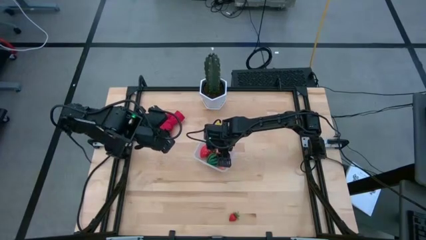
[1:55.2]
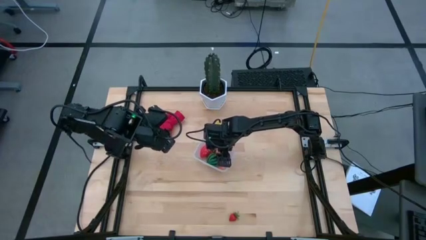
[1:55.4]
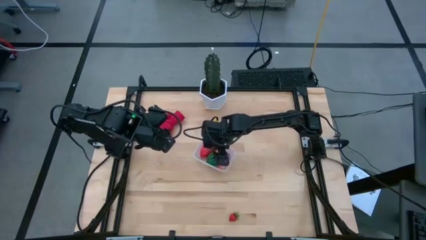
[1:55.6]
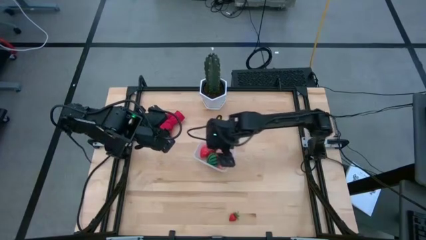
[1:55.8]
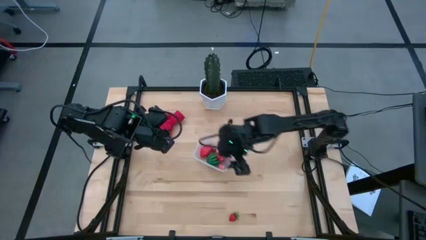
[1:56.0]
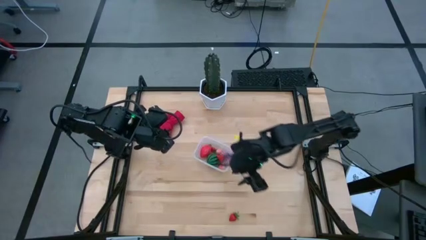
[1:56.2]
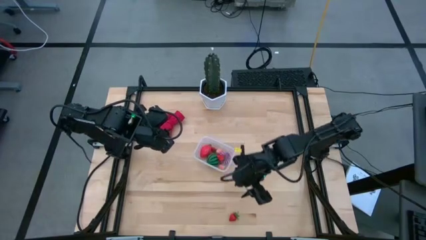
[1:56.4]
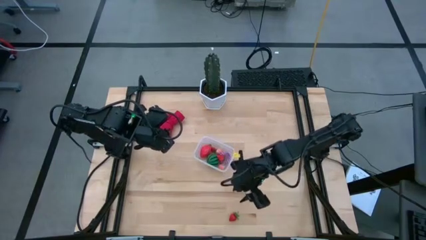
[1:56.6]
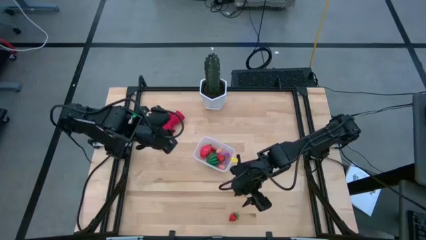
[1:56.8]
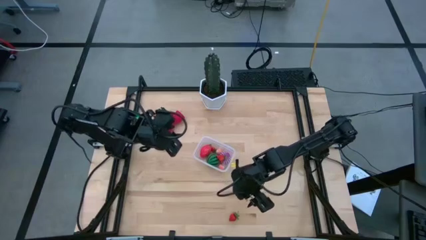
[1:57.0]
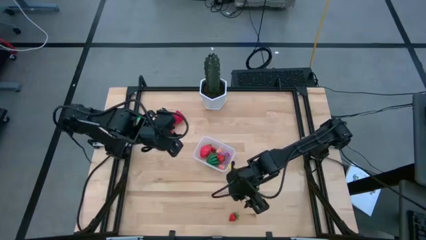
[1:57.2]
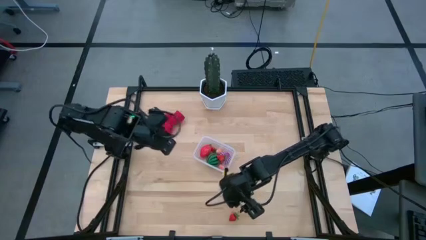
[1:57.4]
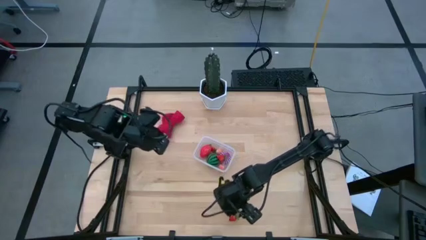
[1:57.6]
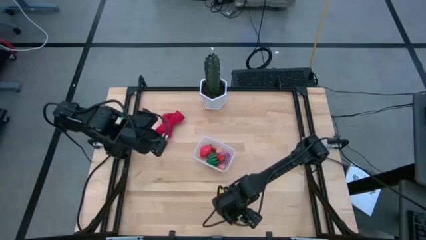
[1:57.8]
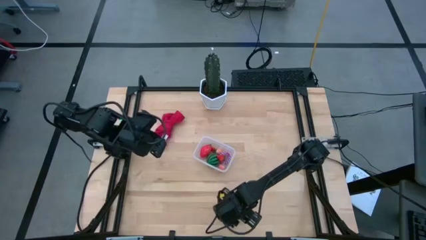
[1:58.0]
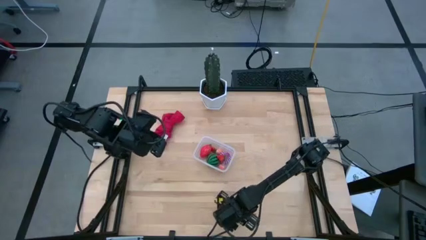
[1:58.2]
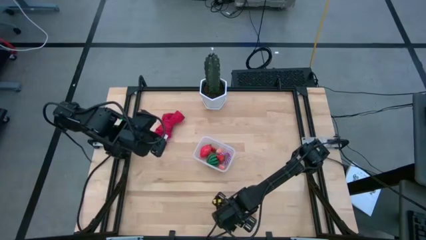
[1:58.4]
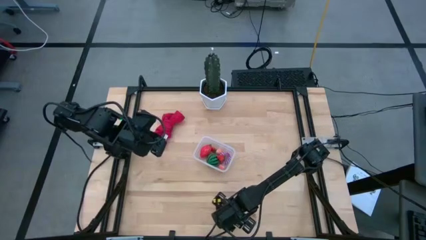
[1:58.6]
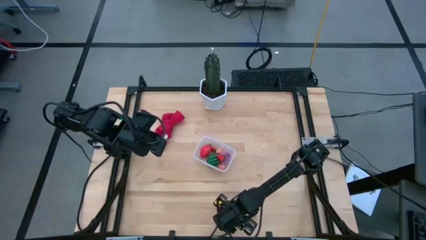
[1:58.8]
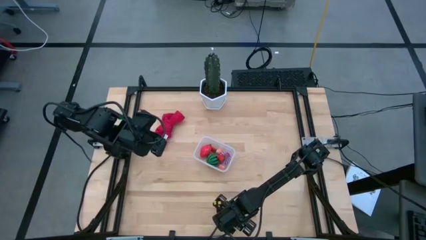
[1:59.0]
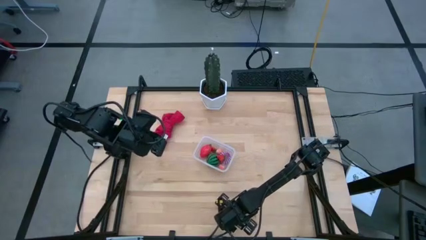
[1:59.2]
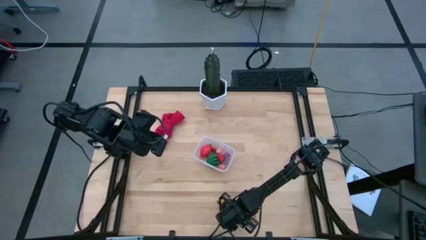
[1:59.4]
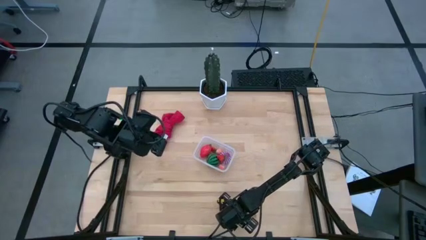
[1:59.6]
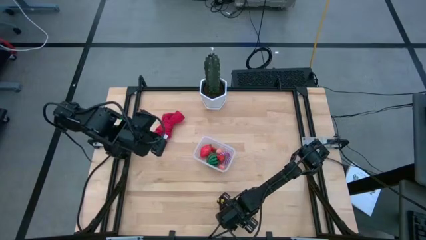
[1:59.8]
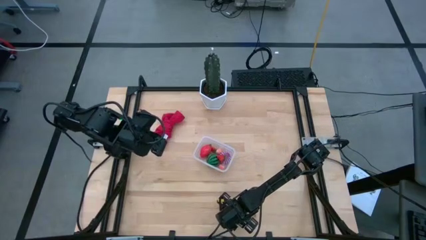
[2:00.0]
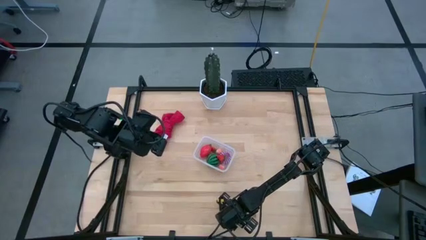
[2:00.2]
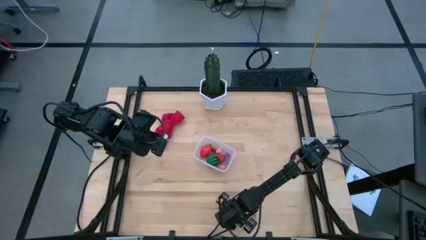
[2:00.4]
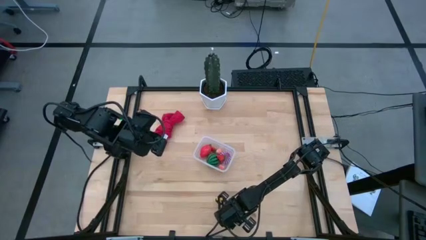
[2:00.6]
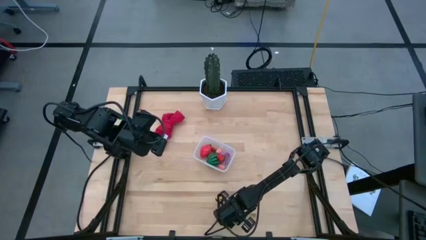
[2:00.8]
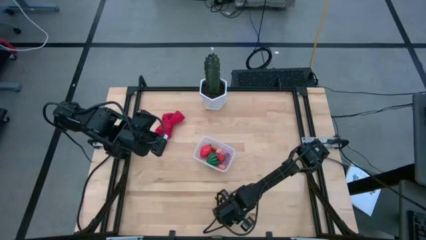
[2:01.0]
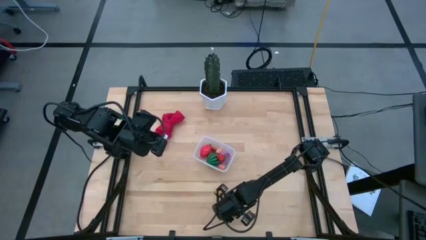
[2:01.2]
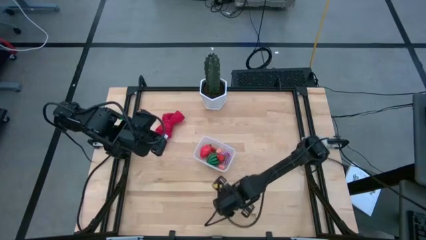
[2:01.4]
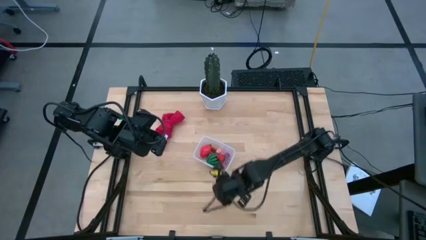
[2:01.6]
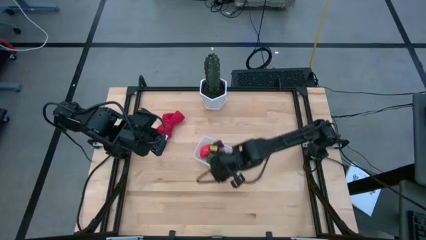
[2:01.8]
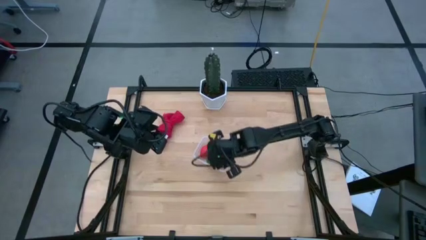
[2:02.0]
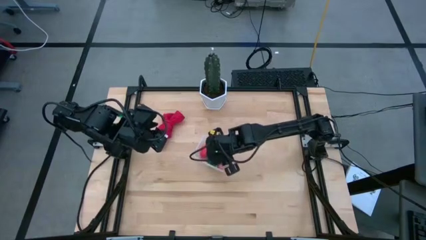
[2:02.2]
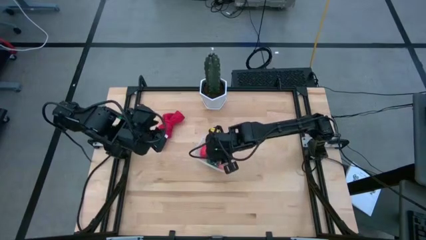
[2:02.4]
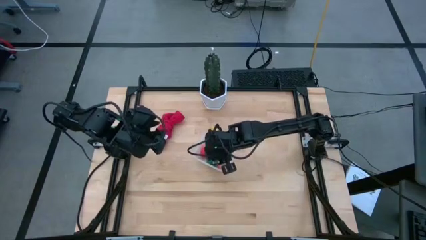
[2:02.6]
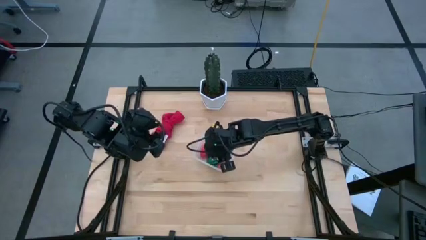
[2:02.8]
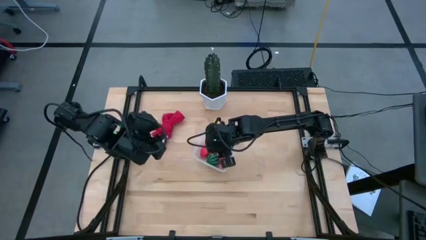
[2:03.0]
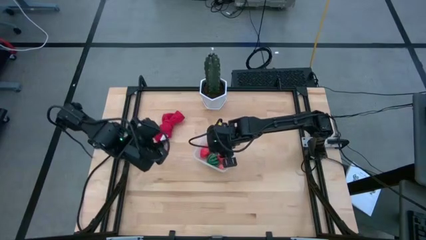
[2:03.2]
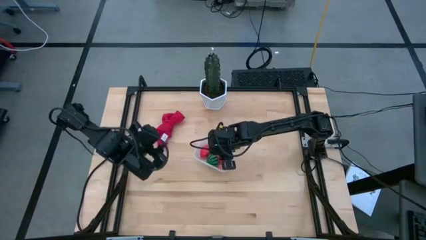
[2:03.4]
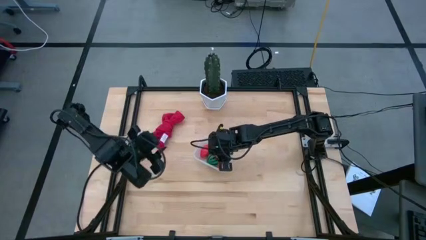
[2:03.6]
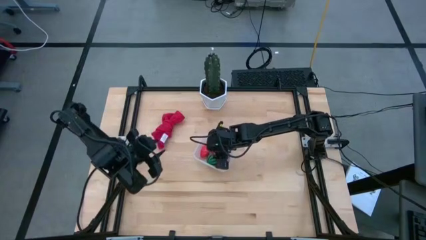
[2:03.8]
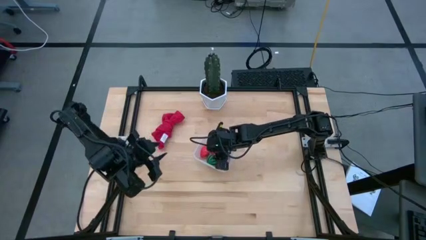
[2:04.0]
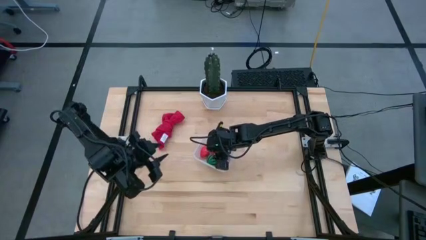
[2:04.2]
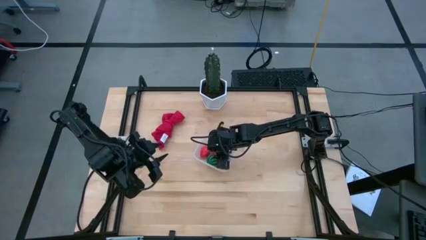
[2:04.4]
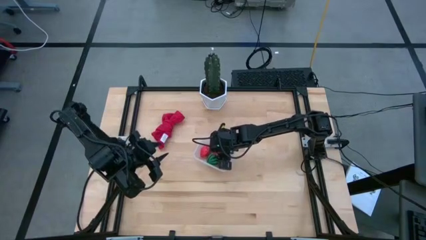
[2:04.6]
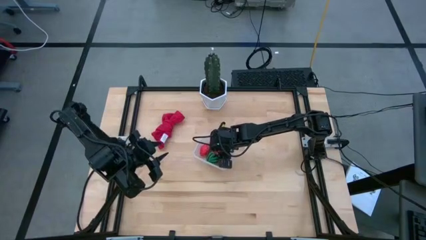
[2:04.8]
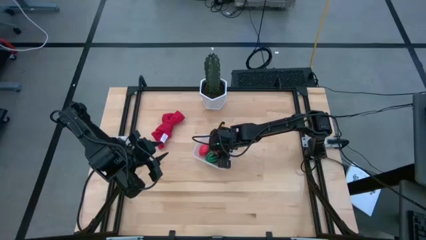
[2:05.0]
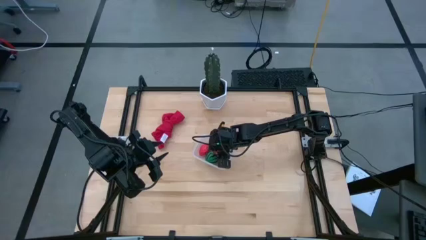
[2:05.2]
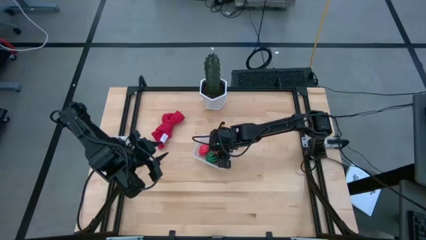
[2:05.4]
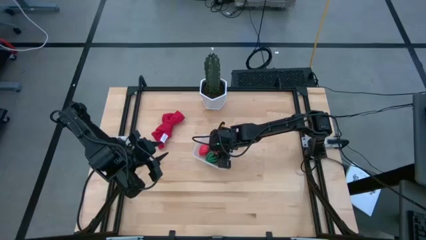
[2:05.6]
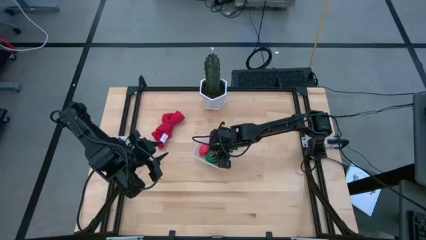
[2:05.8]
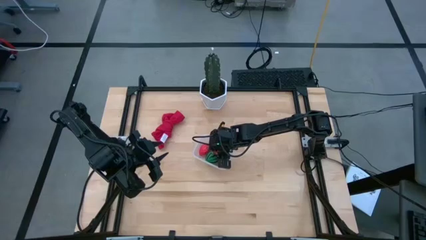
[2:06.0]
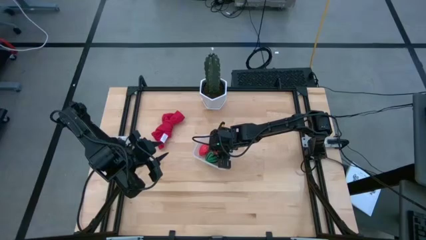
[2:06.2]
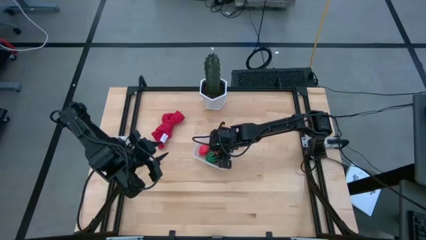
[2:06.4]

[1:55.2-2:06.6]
Task: Pick and placing Produce into tupperware
Put the red strawberry into the transparent container

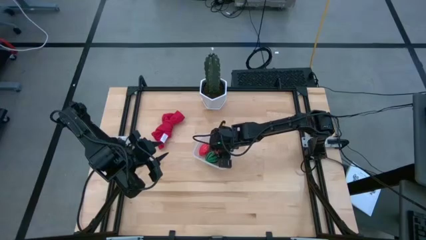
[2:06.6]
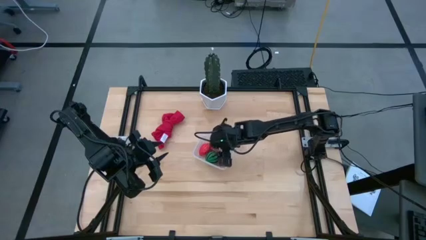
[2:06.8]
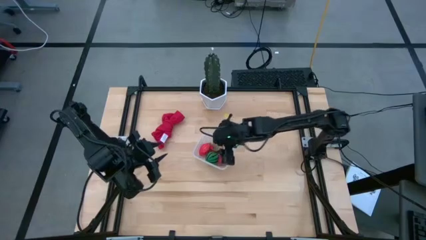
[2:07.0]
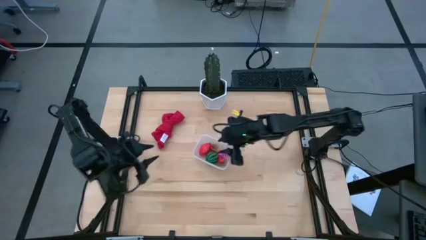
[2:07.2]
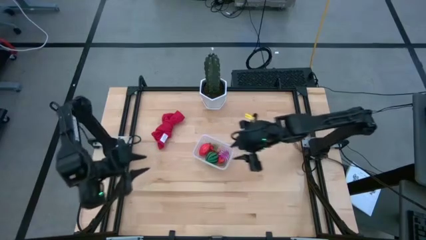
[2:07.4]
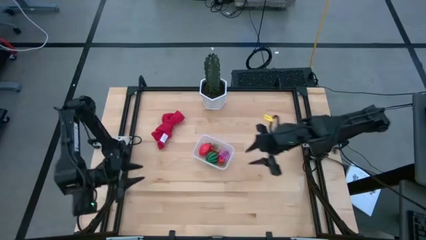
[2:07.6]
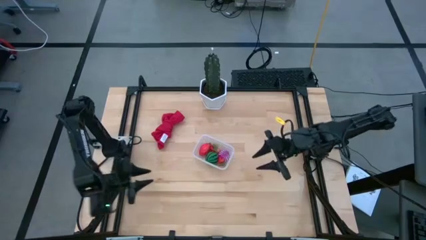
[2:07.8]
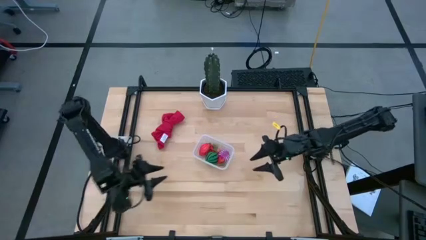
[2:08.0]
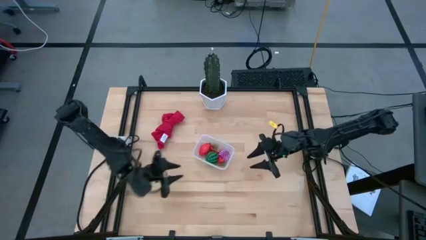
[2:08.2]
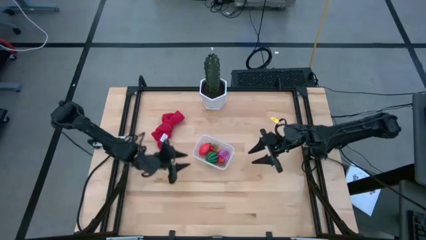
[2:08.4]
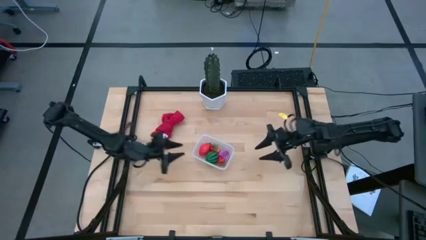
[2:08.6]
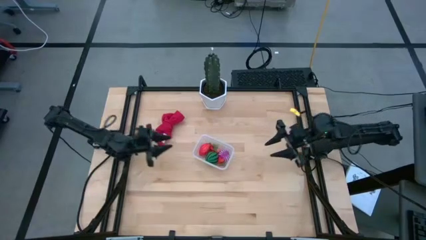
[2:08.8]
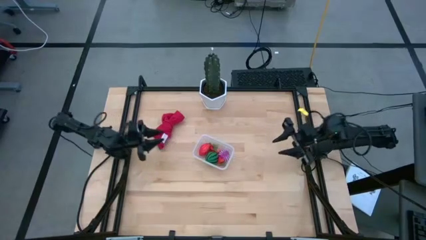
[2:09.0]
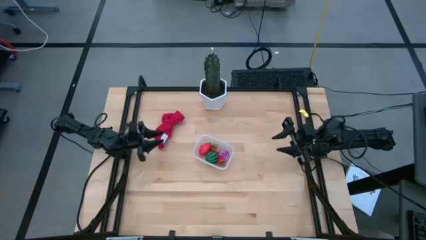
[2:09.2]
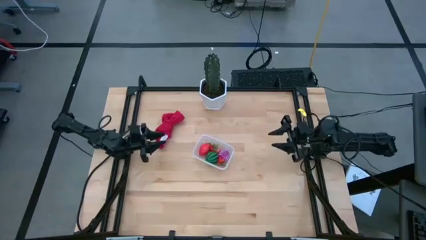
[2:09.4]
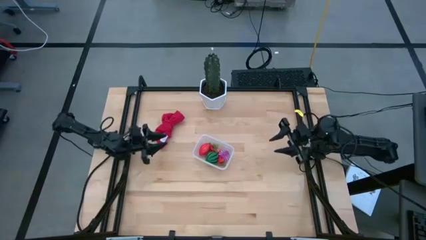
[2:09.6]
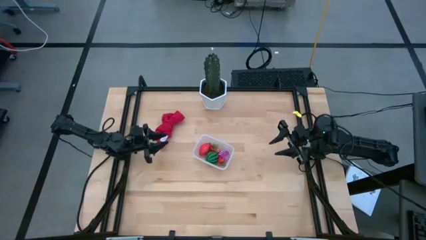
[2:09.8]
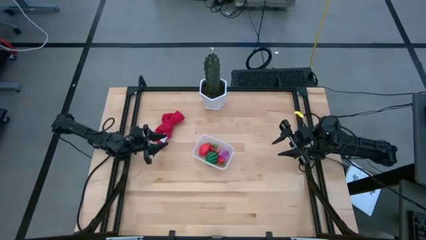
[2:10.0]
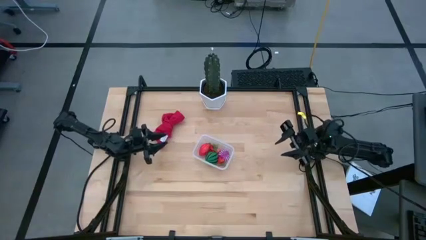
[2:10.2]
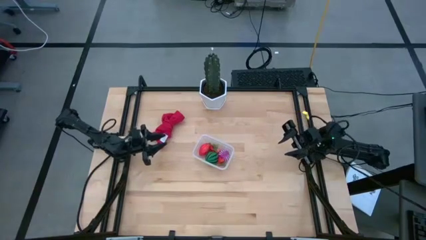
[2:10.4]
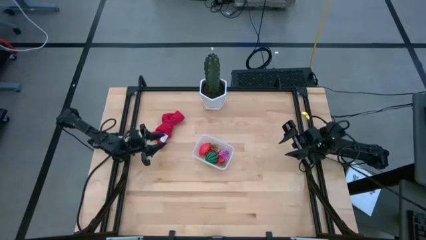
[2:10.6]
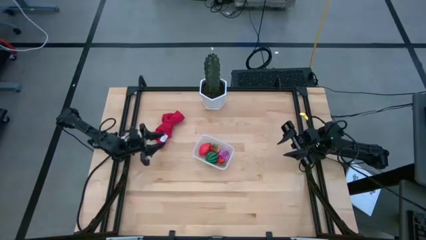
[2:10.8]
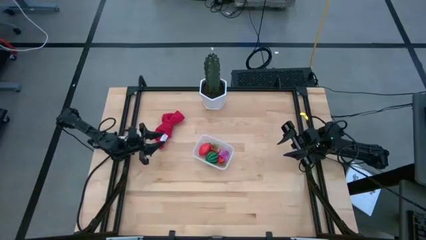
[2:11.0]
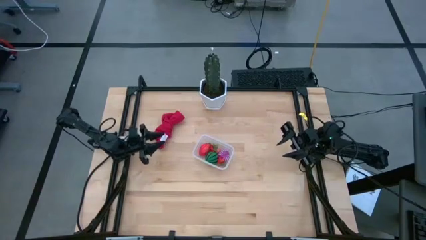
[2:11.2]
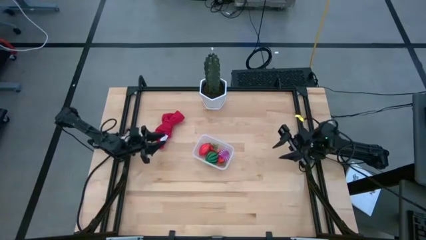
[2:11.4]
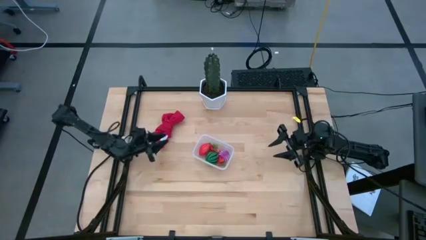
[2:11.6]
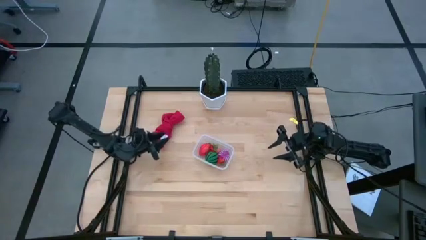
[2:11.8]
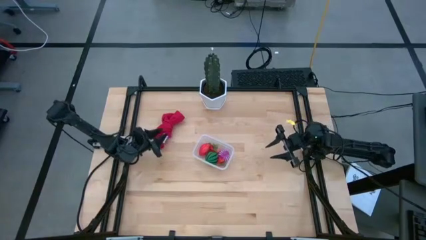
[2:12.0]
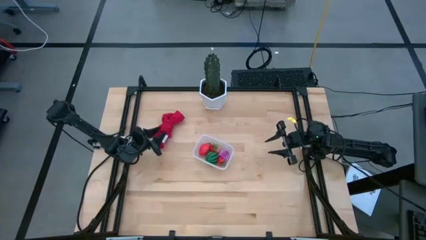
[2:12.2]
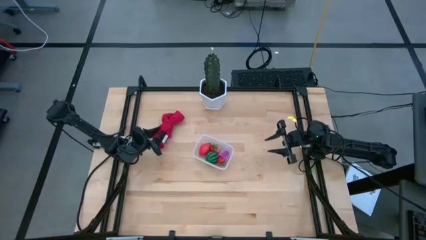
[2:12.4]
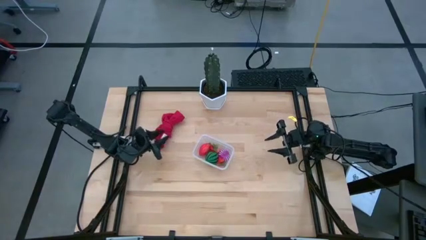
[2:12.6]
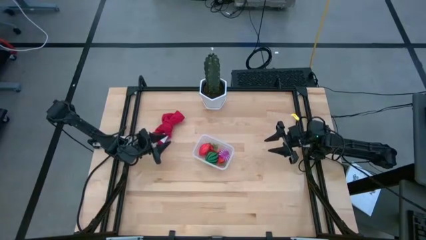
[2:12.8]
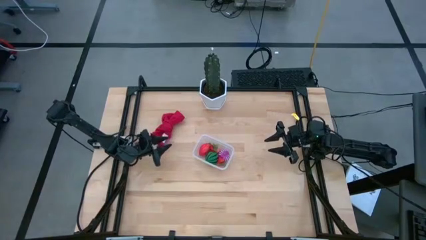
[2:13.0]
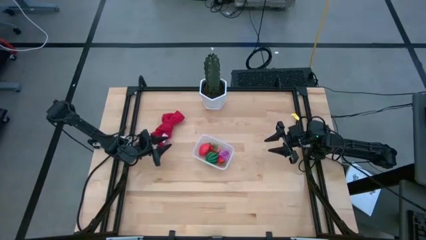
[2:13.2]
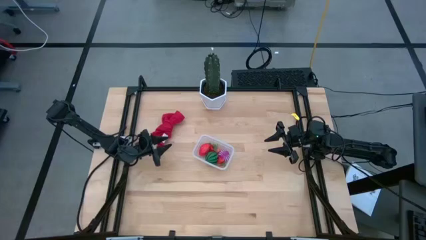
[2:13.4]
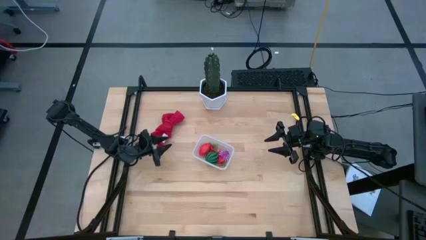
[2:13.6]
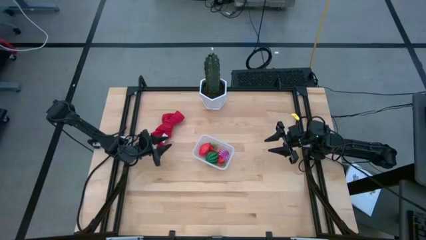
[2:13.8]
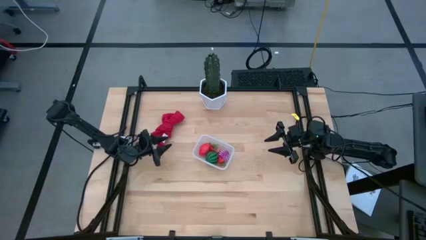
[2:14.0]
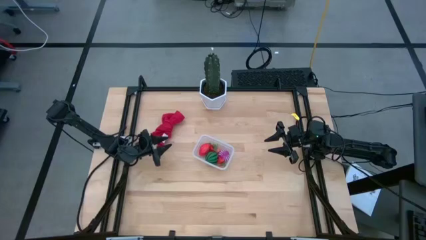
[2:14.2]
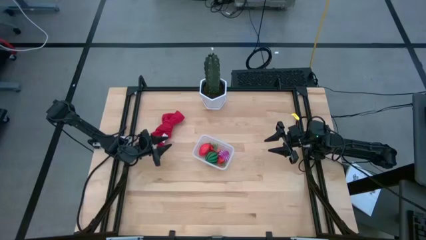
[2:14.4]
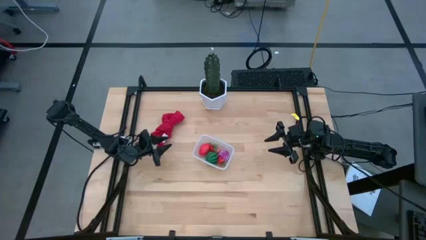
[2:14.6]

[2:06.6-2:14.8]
Return to Home Position
